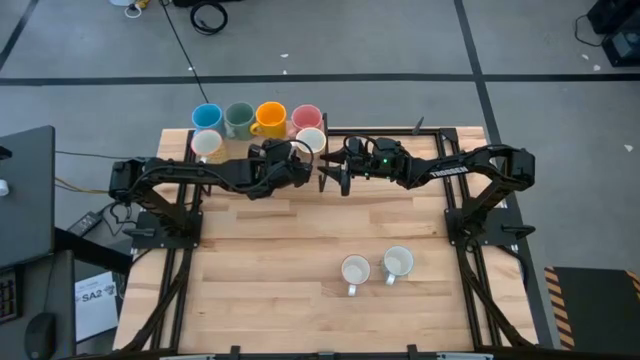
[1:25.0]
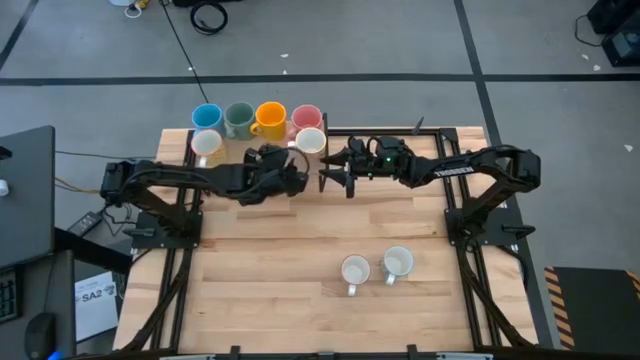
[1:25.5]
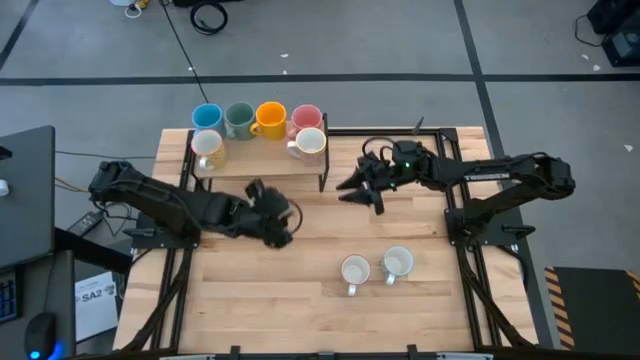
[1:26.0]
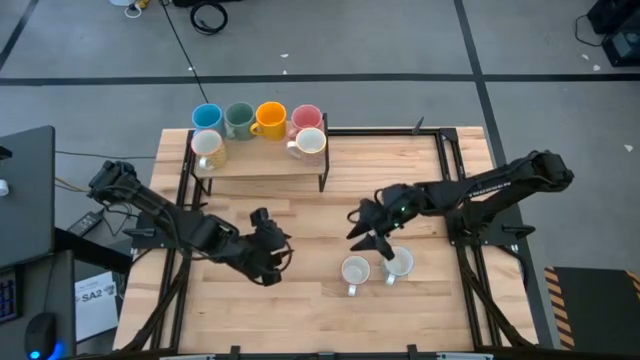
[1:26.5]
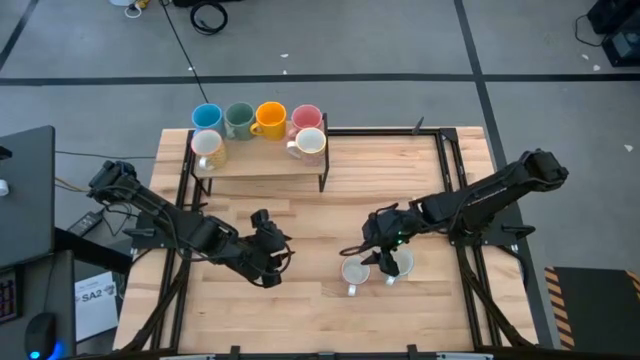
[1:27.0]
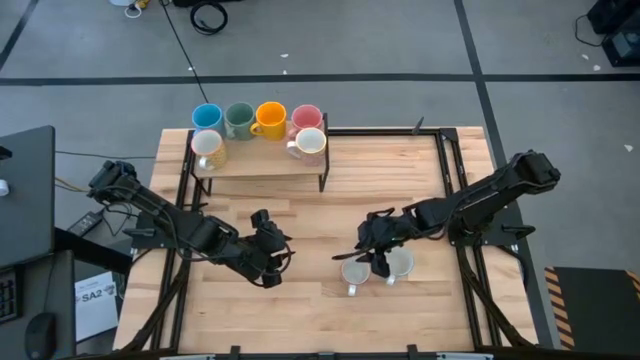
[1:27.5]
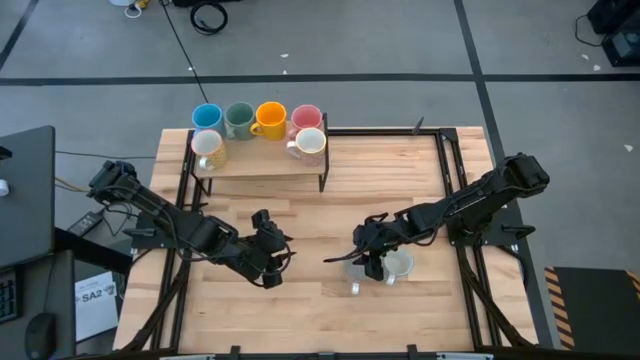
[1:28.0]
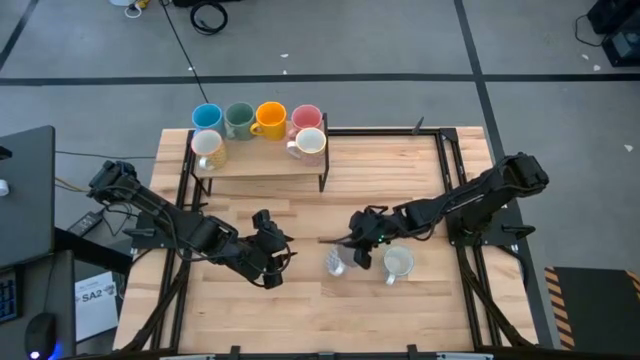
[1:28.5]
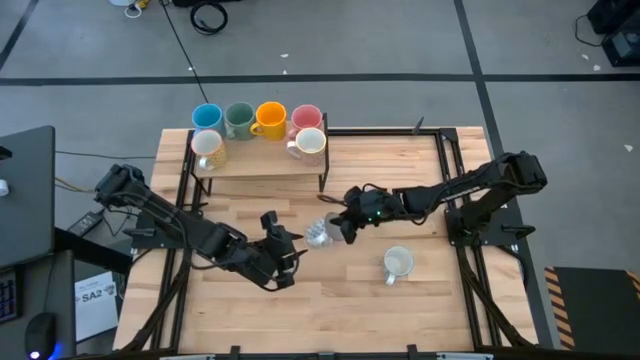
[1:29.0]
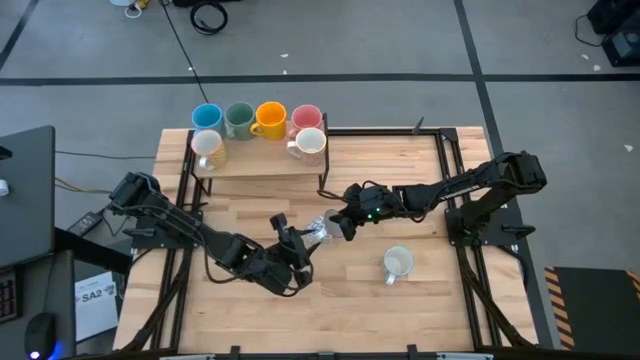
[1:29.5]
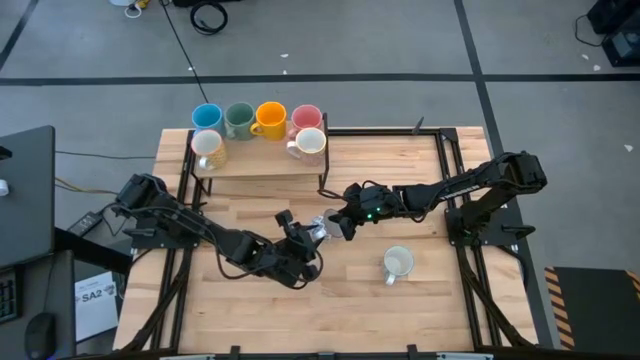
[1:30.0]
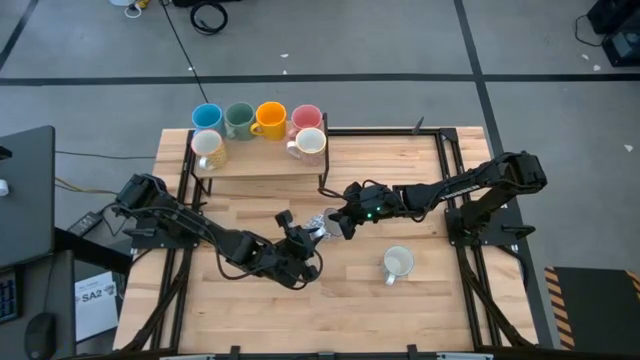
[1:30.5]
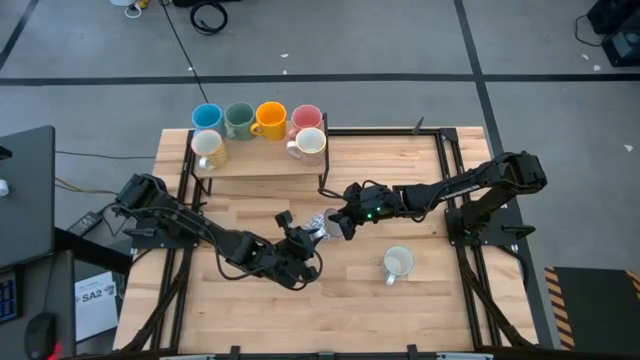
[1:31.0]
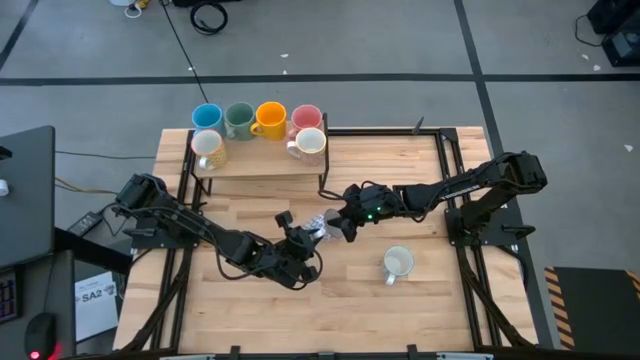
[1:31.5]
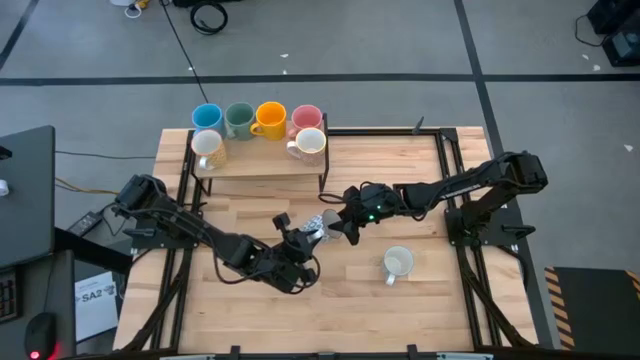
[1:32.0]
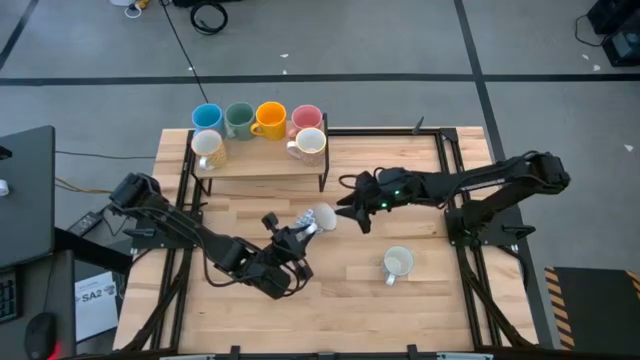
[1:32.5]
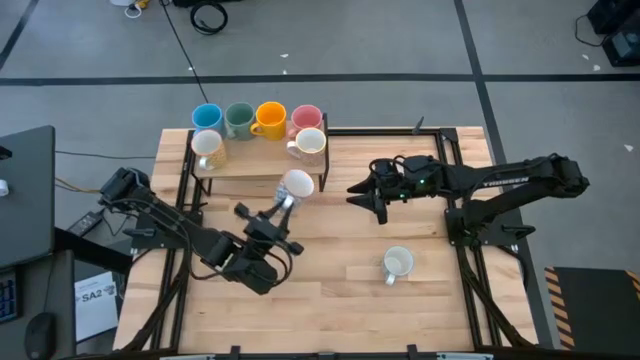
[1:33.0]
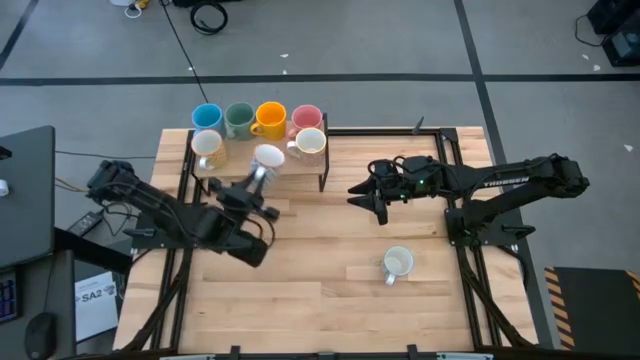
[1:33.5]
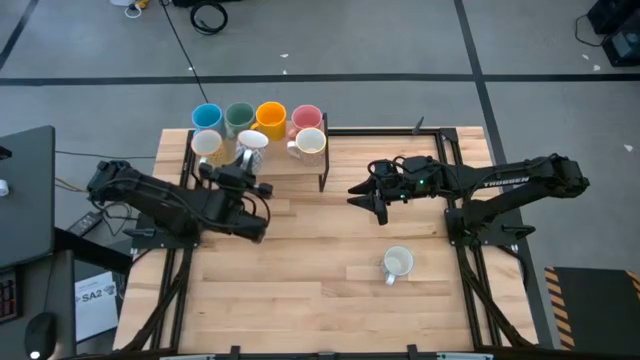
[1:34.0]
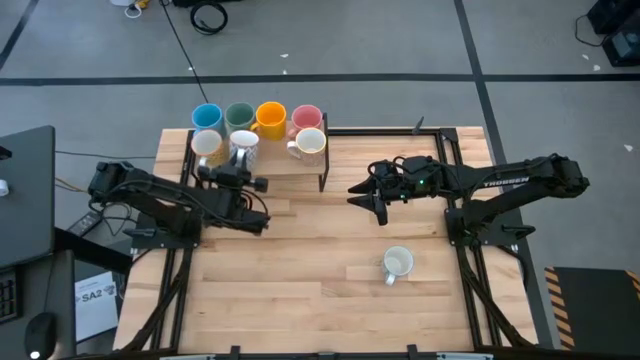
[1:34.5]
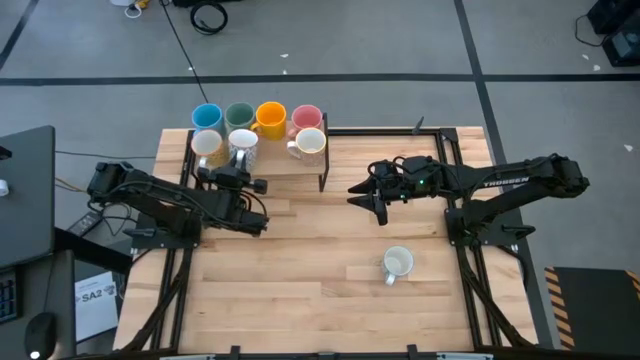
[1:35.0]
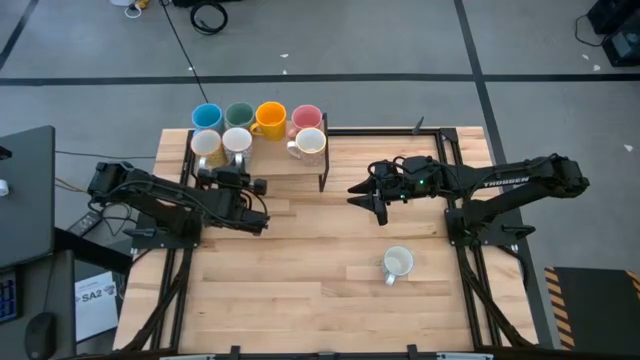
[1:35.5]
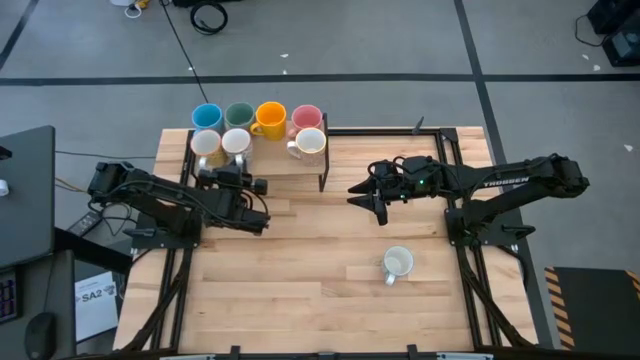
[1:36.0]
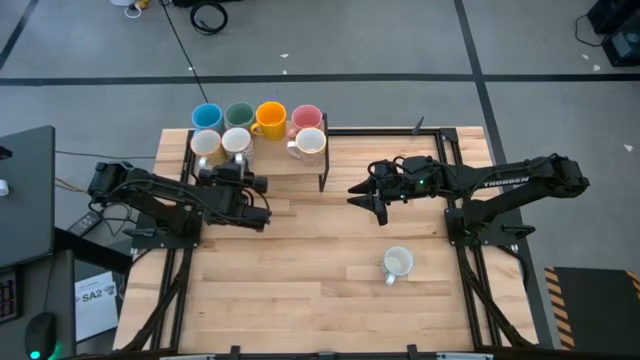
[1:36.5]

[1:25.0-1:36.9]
Task: Place coffee mugs
Put the gray patterned mug on the shelf

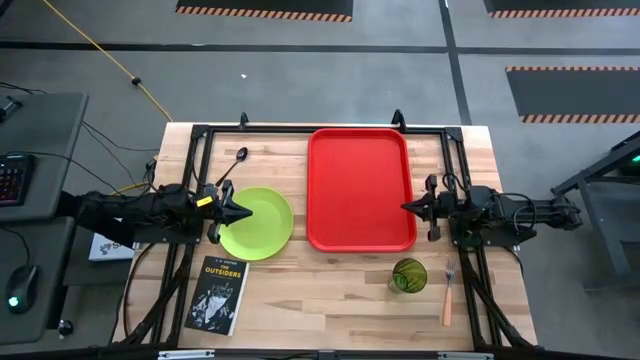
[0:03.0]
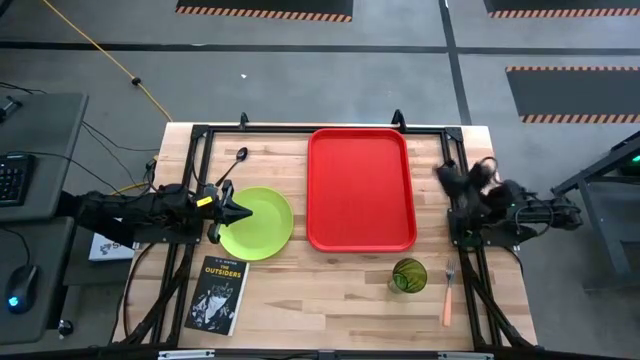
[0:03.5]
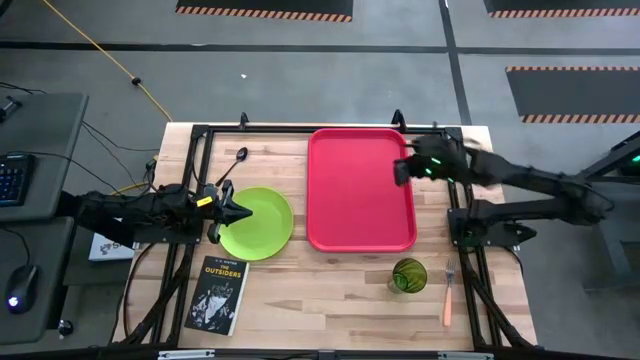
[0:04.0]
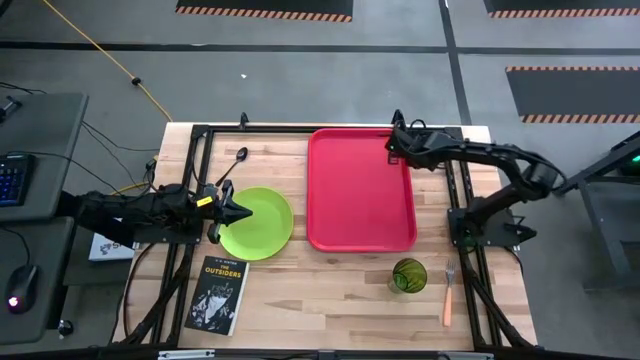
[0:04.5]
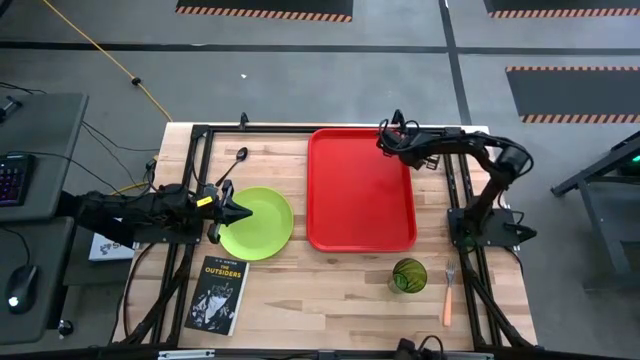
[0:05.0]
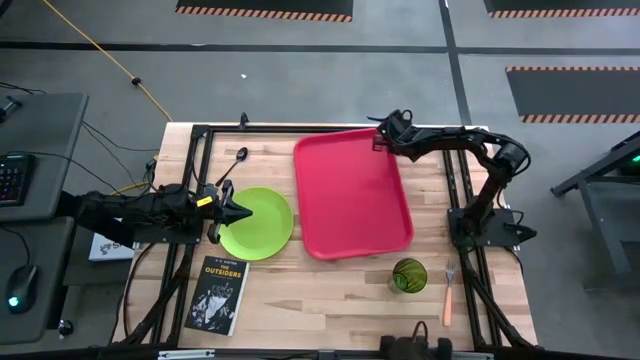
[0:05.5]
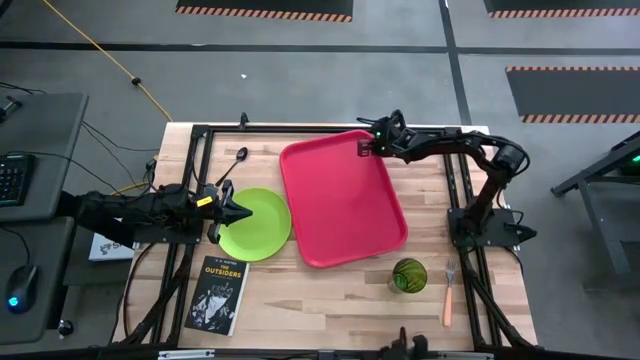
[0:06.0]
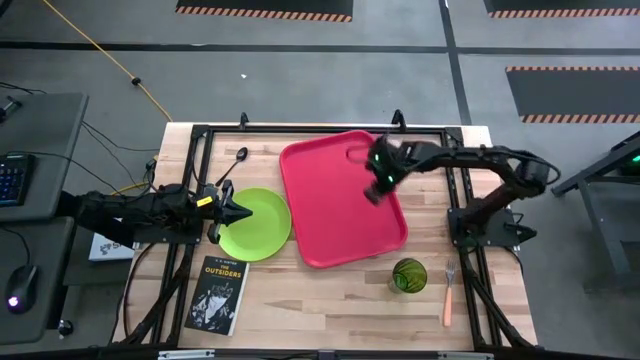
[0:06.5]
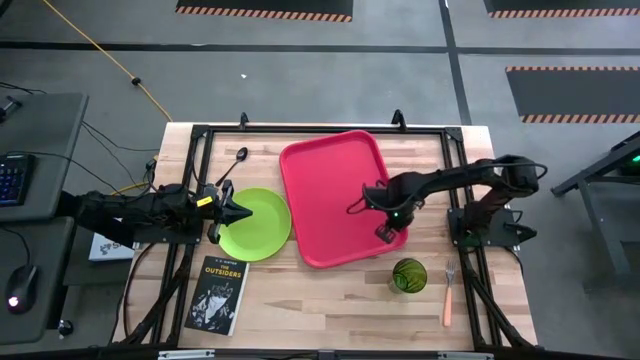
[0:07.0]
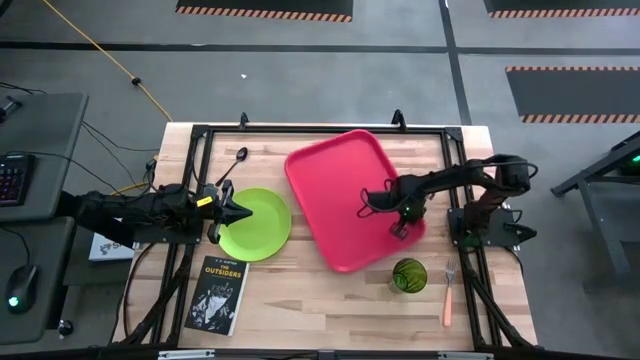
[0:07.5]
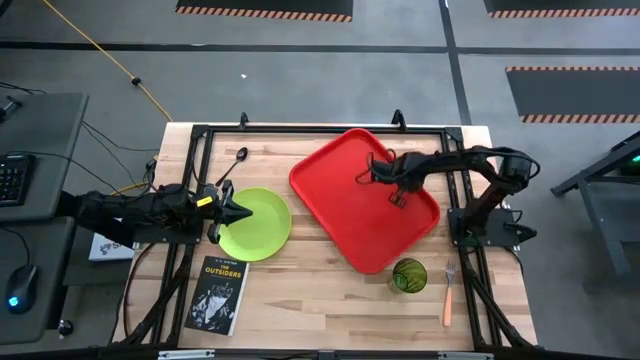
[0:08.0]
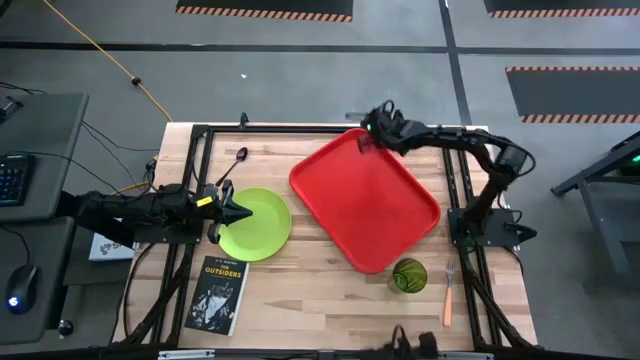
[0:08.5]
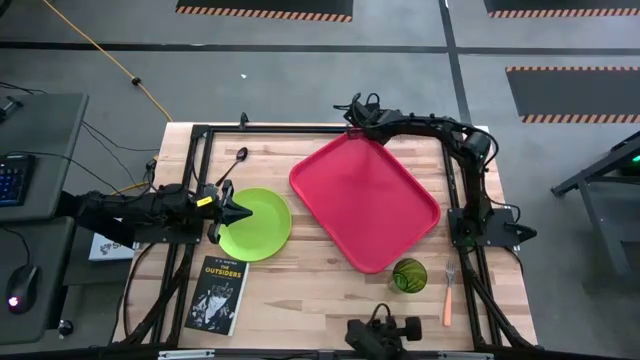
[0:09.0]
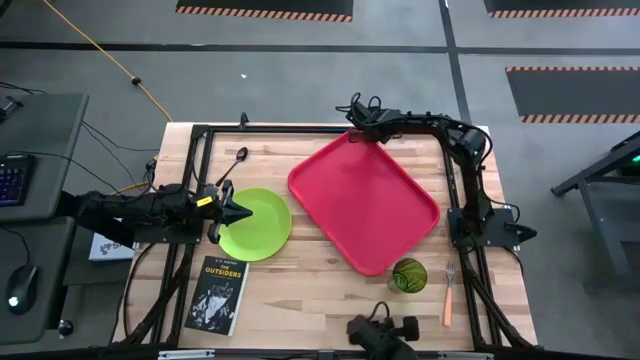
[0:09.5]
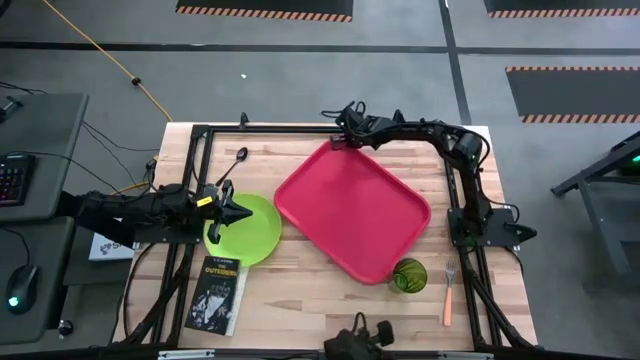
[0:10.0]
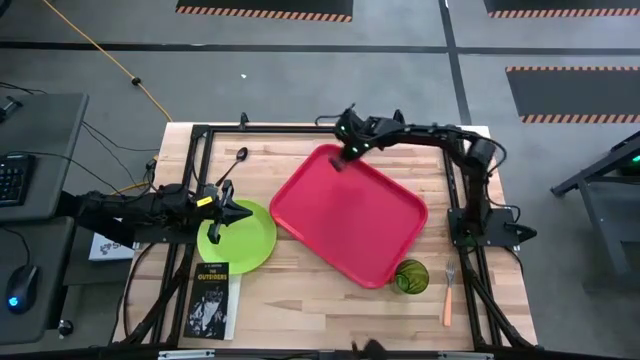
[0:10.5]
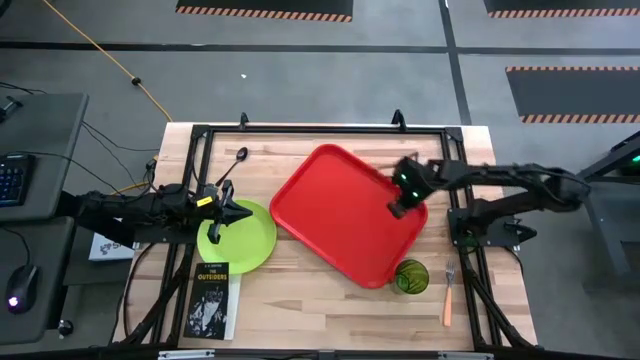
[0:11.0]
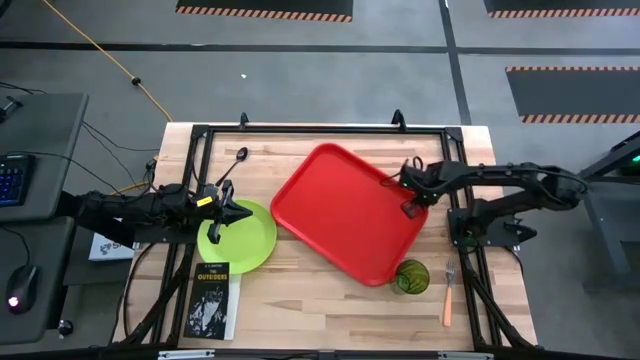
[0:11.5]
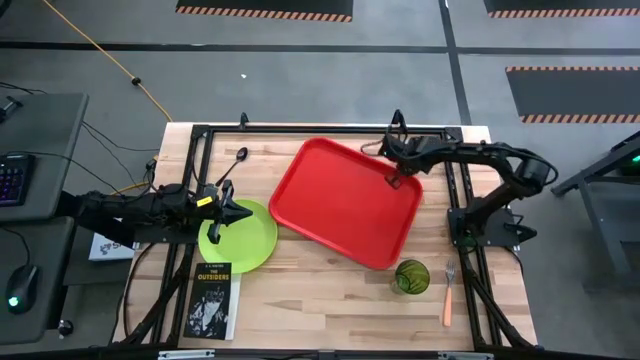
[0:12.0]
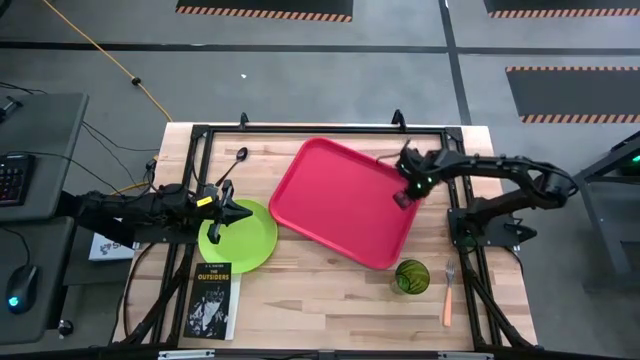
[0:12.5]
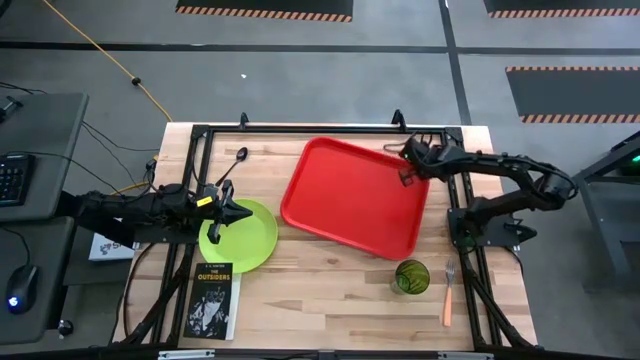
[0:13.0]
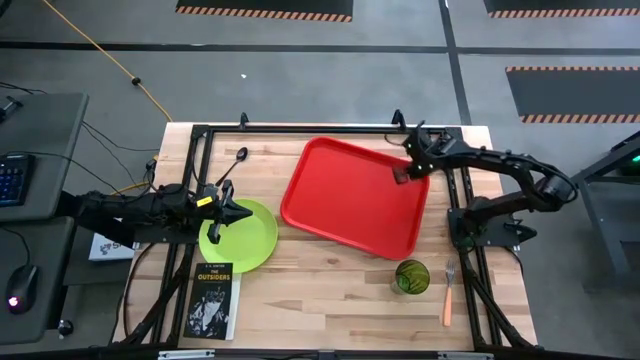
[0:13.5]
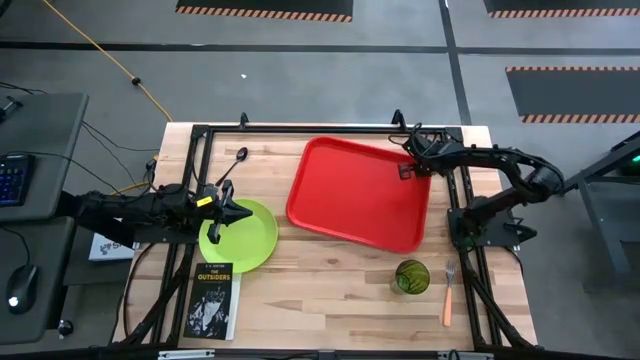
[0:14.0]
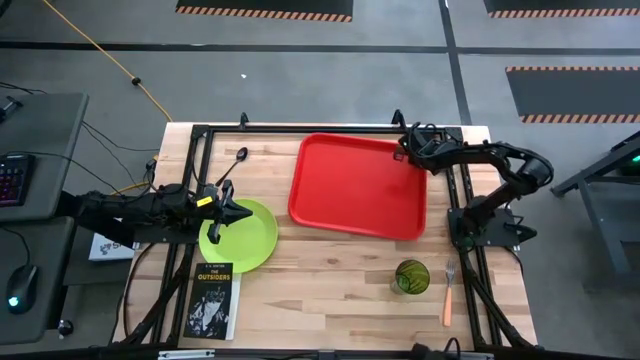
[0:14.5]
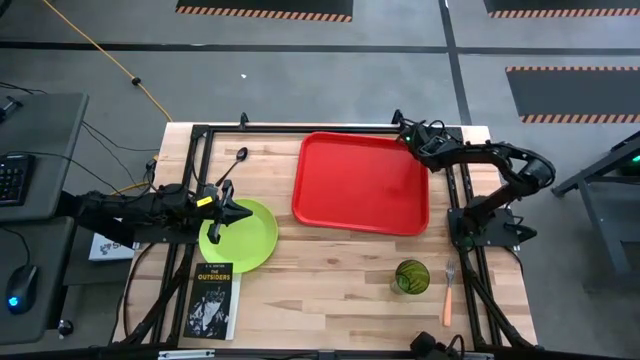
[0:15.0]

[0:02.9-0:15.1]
Task: Pick and place plate/cup/fork/spoon on tray
Adjust the red tray
